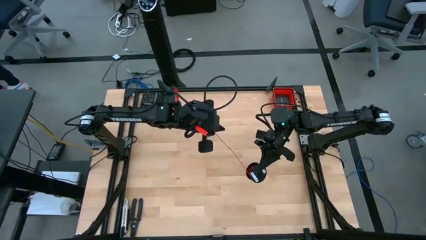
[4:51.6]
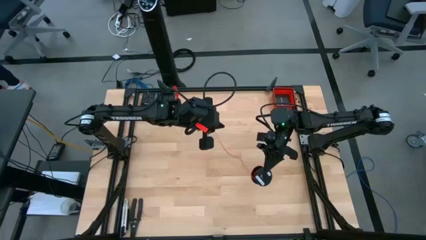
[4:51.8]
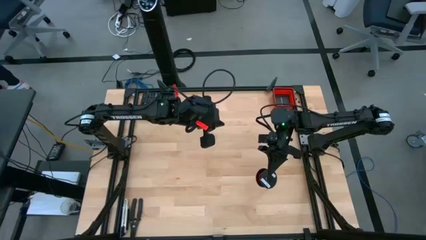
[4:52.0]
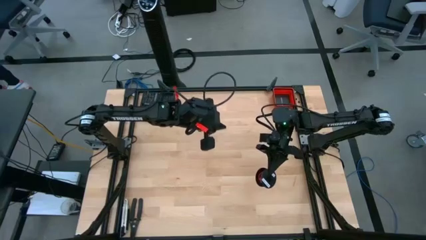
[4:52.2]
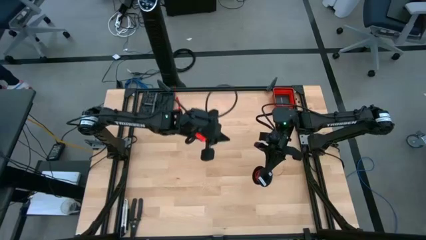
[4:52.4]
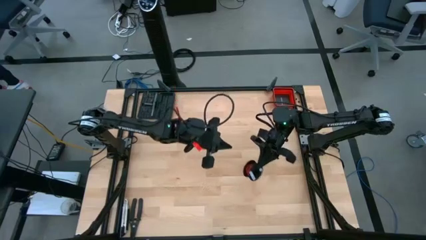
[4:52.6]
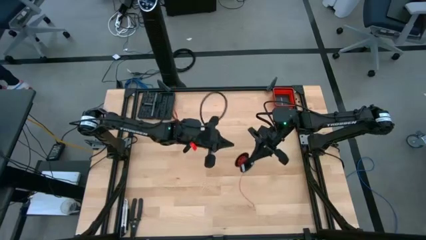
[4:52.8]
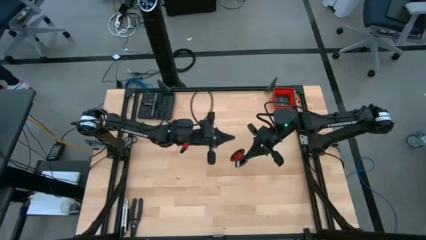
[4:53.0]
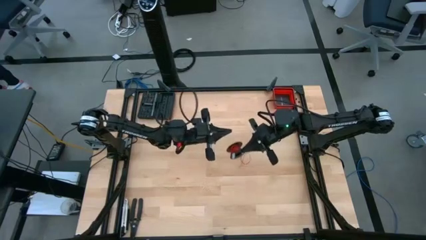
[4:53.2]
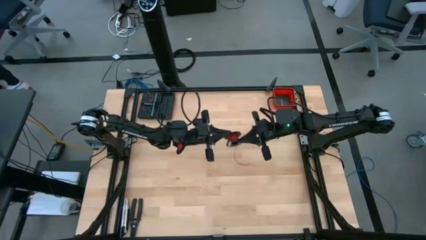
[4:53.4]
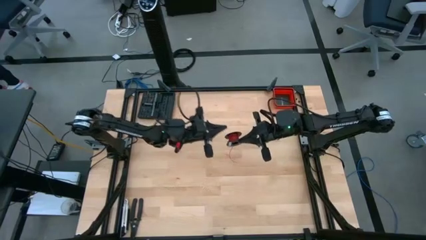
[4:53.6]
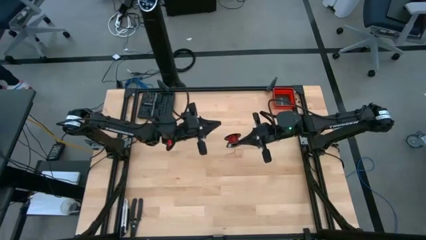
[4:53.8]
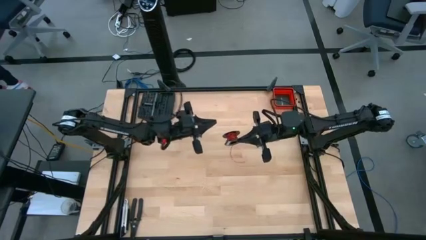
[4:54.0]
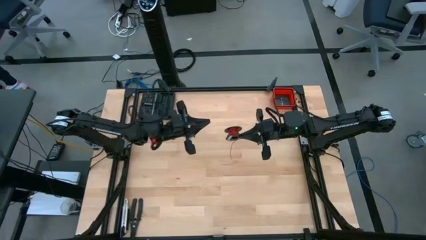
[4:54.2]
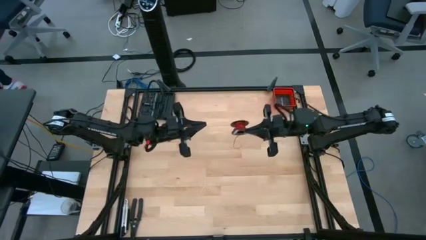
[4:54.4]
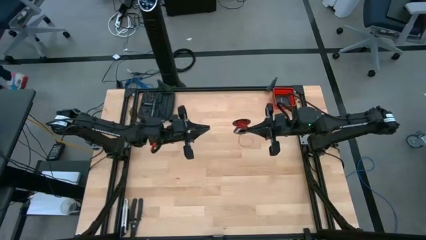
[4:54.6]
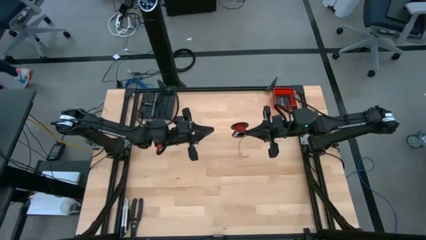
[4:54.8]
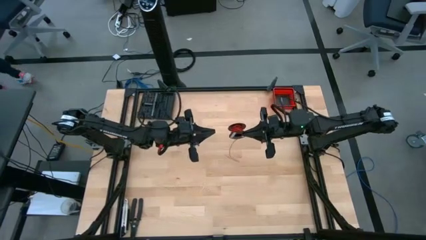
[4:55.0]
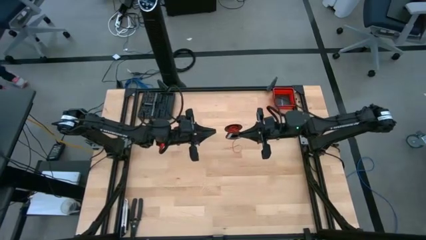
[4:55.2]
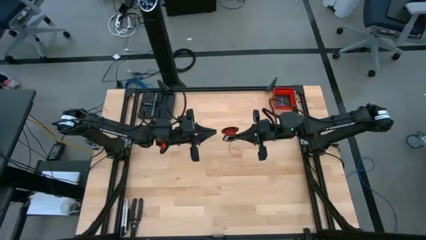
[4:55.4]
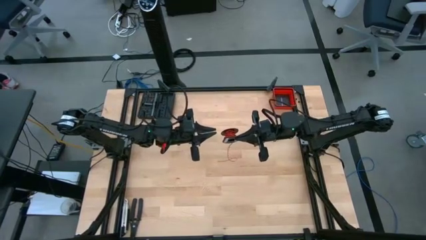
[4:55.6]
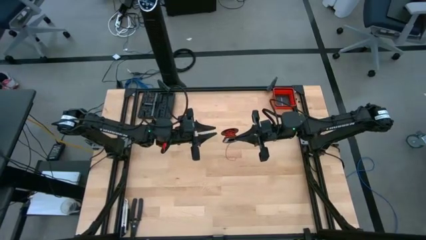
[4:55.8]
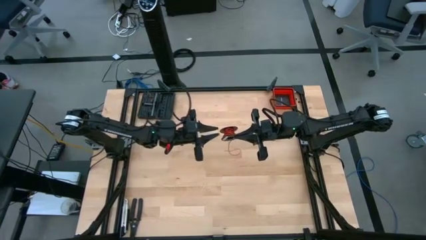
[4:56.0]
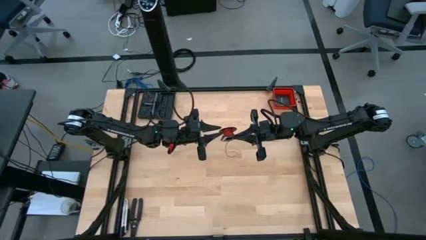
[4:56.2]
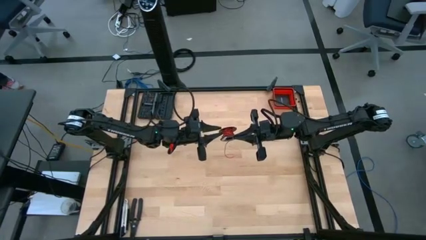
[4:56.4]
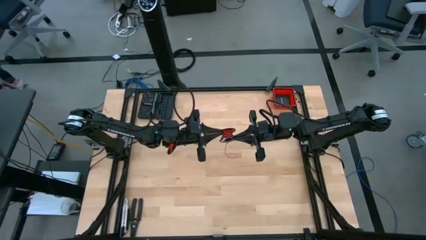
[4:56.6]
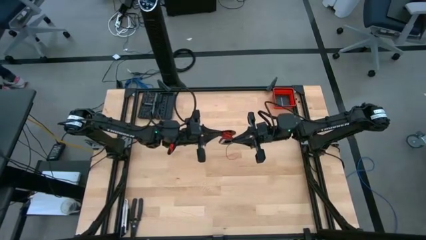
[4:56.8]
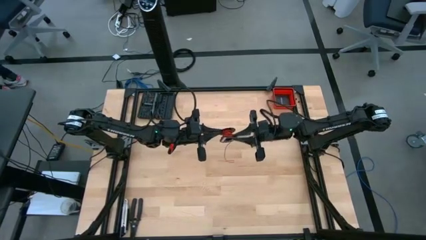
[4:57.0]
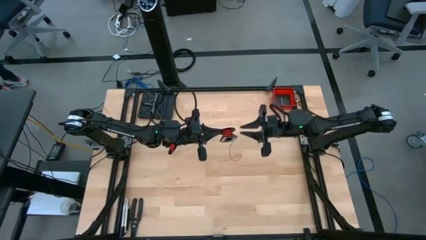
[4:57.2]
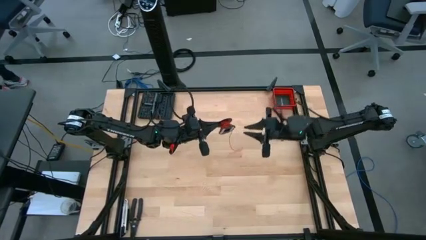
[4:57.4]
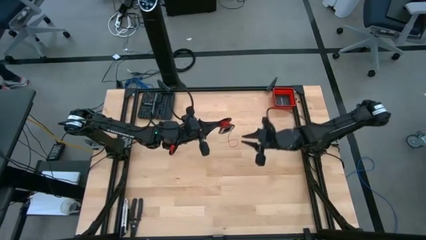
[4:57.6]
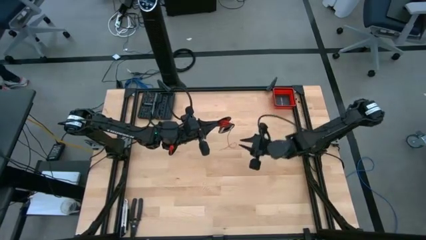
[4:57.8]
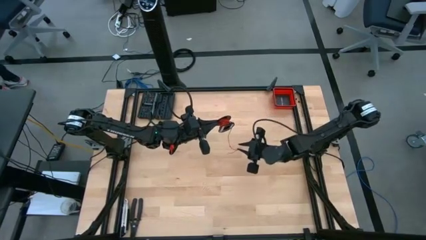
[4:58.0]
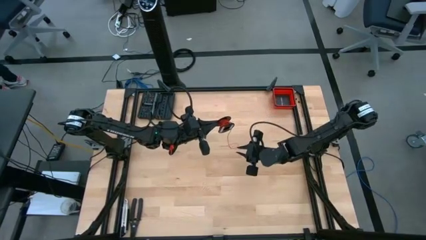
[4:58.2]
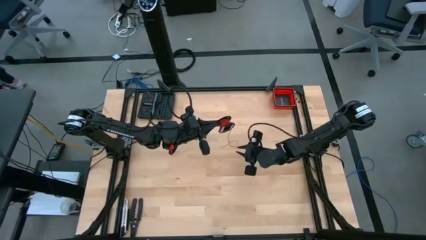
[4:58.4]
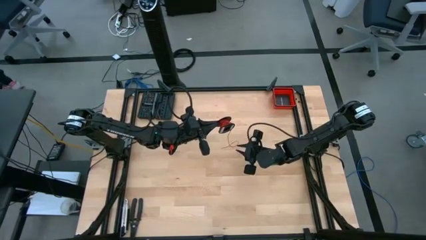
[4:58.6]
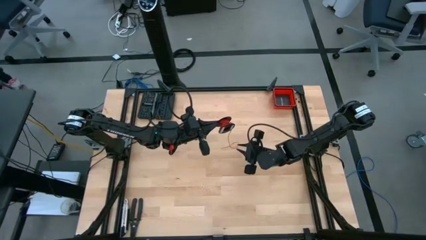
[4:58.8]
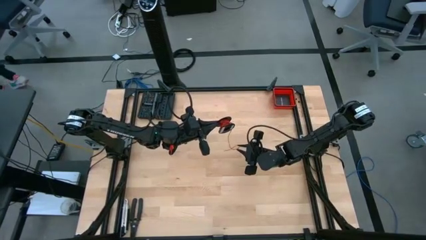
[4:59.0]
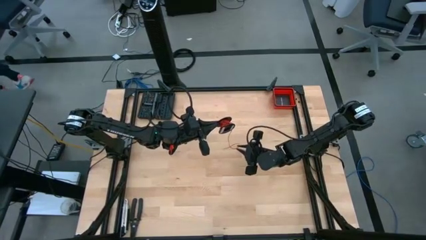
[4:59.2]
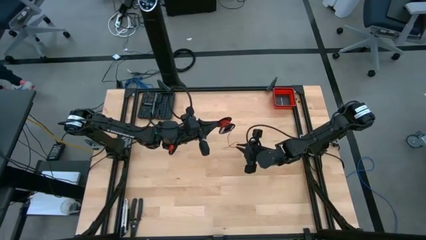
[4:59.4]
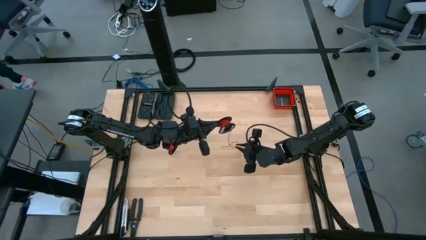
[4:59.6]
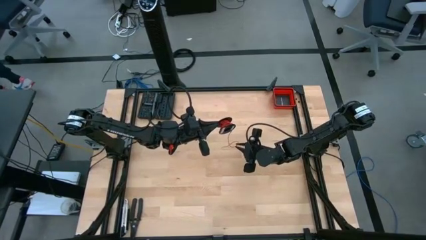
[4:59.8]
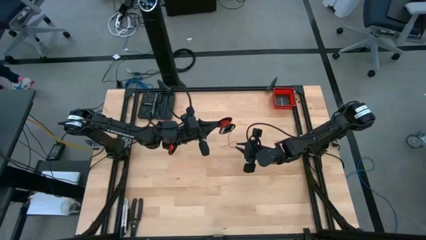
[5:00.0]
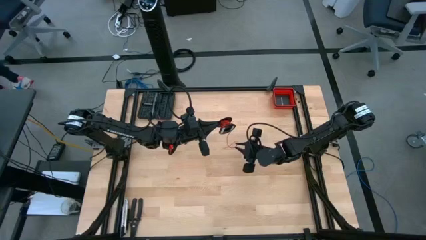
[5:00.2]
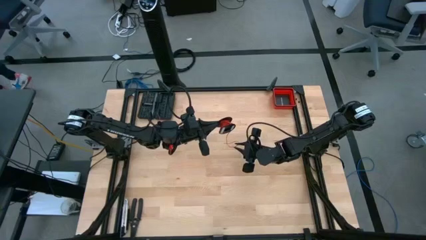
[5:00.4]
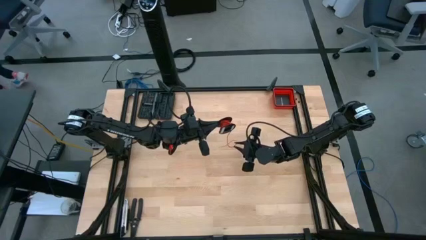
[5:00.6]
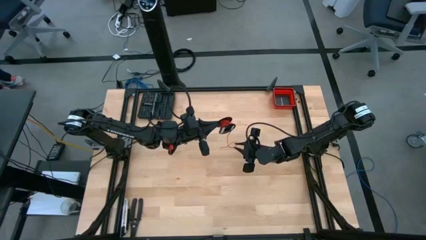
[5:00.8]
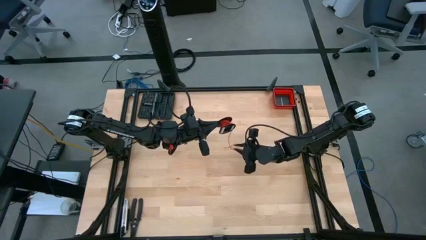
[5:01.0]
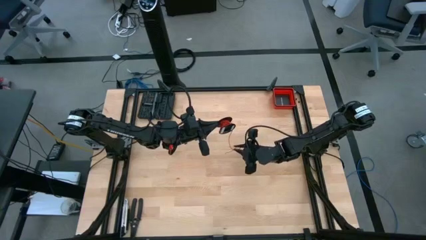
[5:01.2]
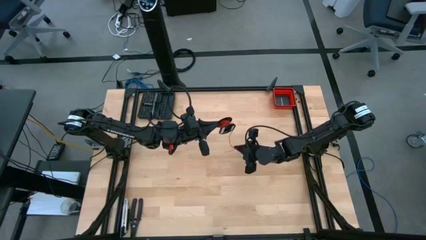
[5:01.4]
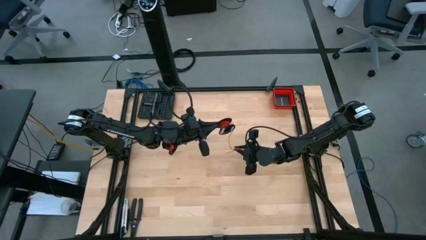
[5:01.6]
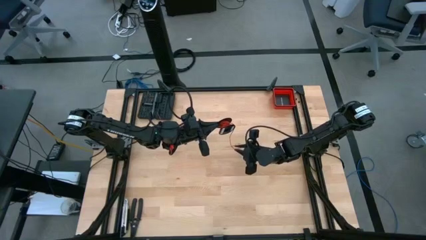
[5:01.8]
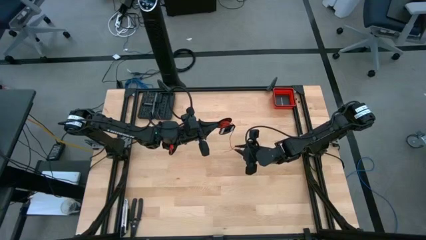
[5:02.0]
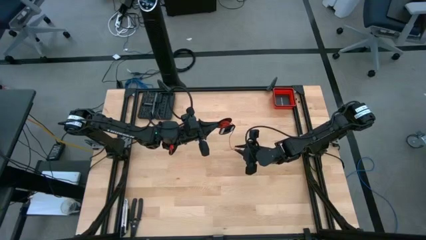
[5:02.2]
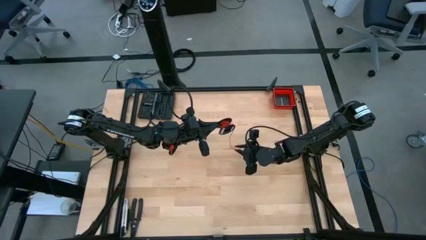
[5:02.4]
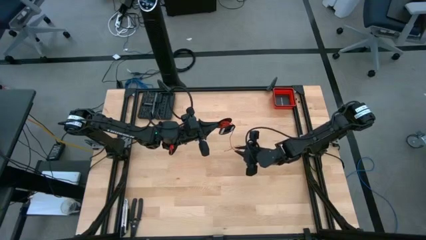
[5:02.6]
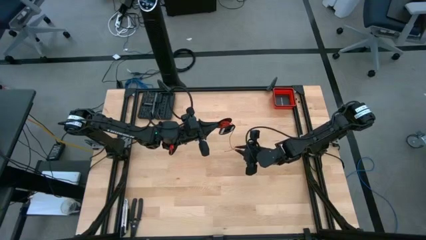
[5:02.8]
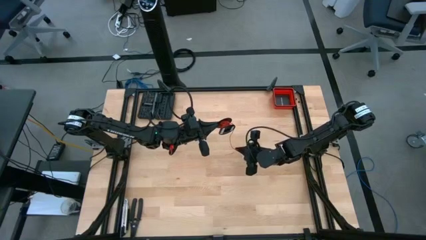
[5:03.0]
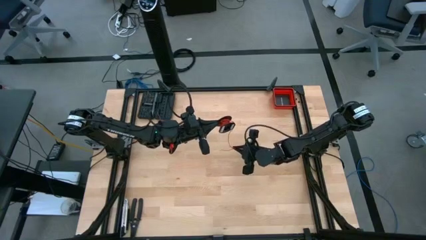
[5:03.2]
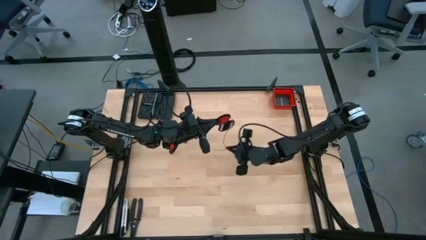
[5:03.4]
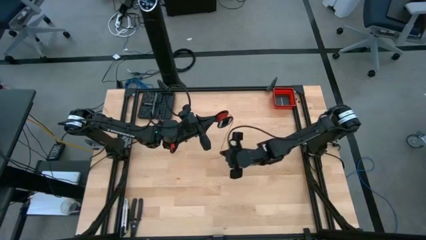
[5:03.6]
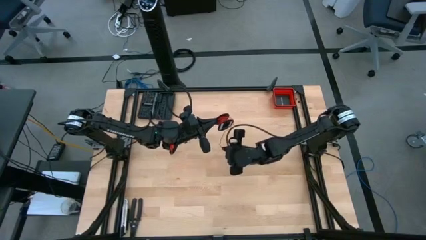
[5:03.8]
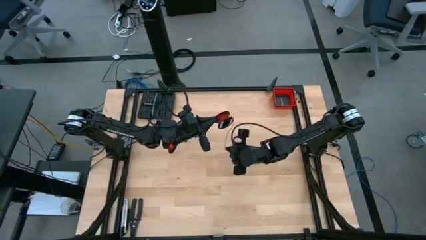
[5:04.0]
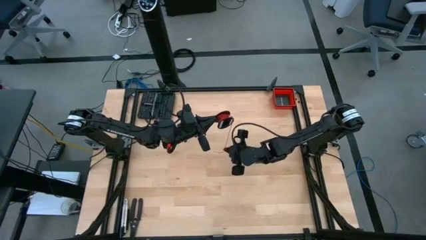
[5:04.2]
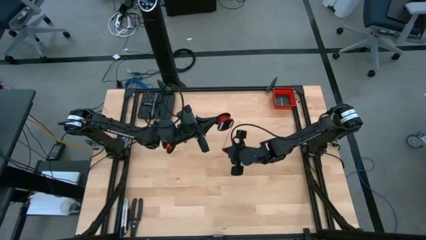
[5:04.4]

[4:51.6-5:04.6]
Task: Coil cords
Coil the red wire on the black spool

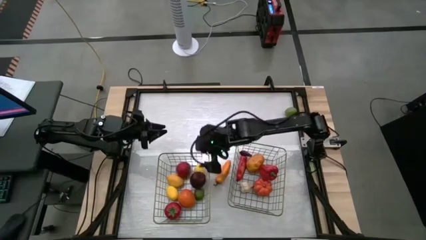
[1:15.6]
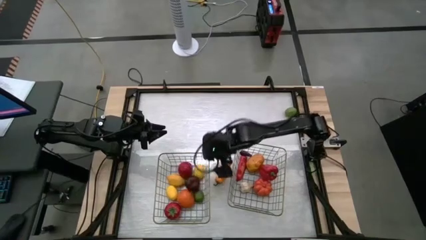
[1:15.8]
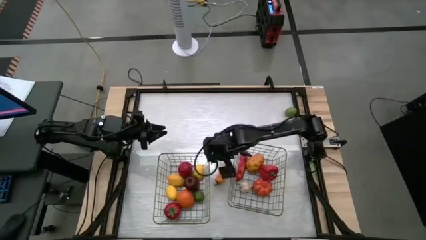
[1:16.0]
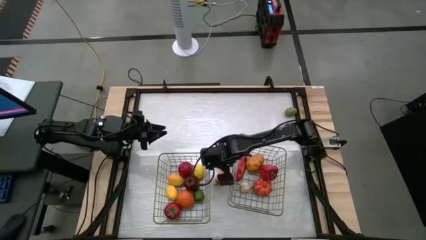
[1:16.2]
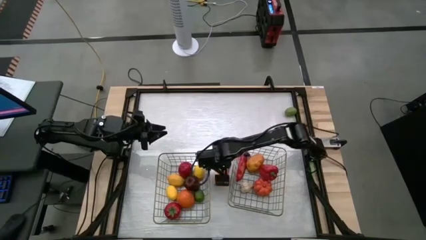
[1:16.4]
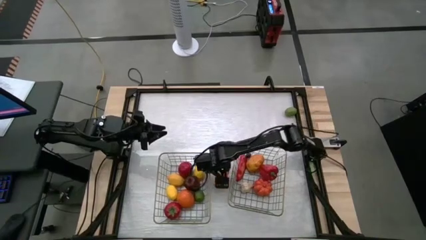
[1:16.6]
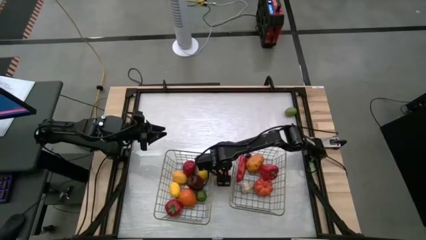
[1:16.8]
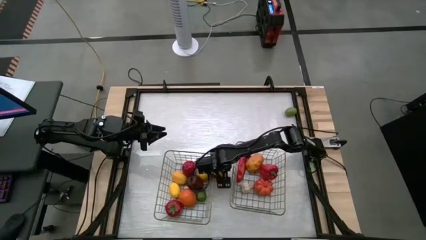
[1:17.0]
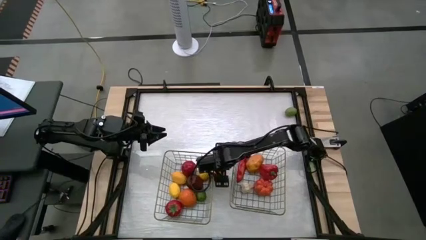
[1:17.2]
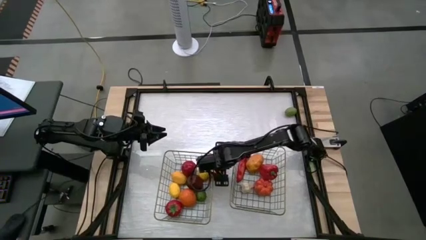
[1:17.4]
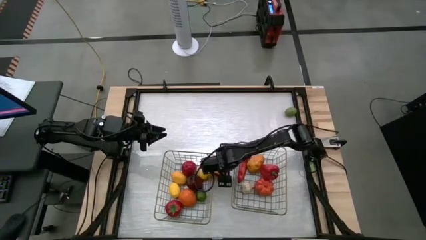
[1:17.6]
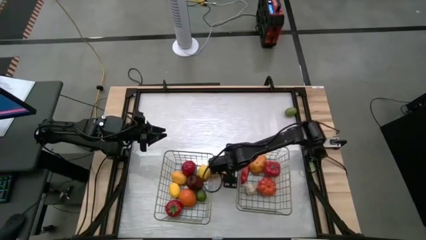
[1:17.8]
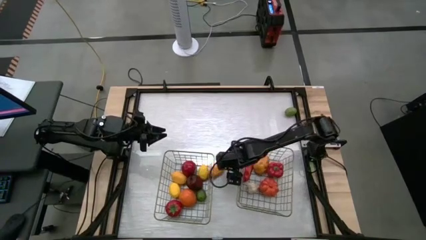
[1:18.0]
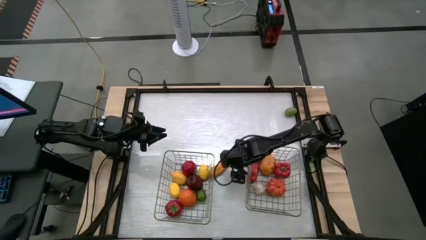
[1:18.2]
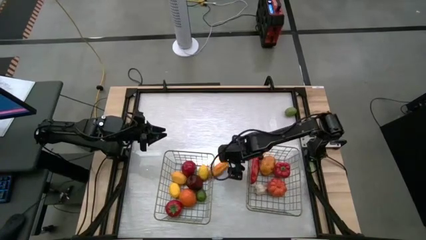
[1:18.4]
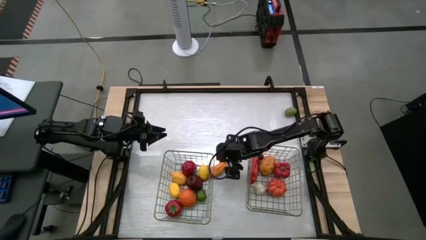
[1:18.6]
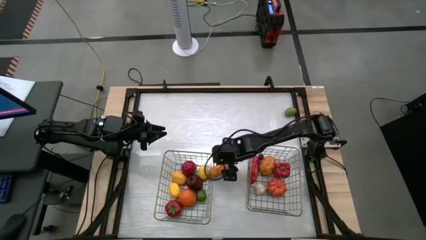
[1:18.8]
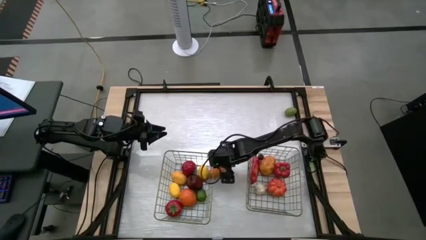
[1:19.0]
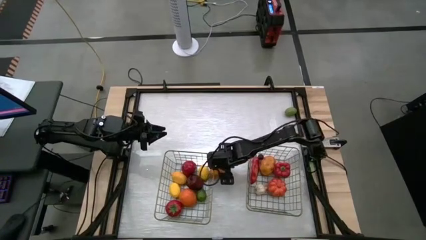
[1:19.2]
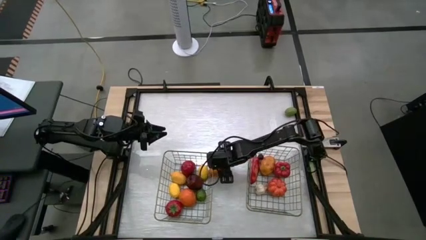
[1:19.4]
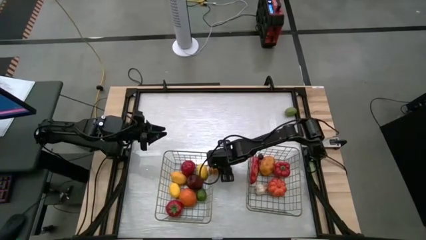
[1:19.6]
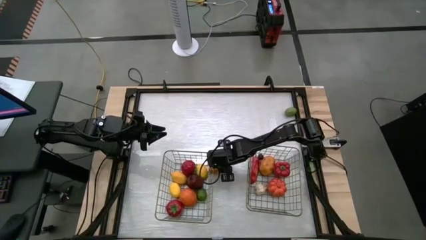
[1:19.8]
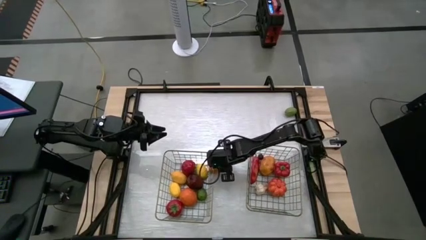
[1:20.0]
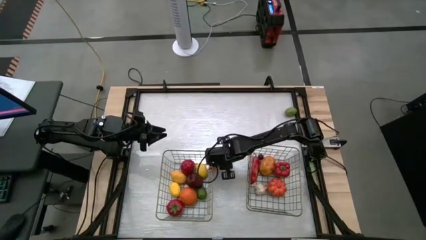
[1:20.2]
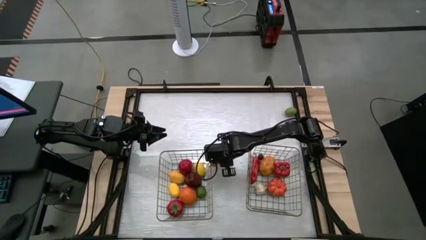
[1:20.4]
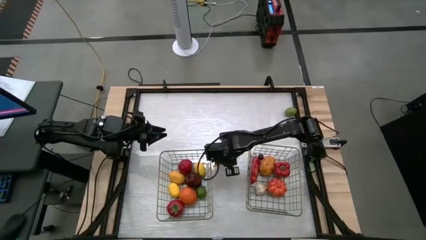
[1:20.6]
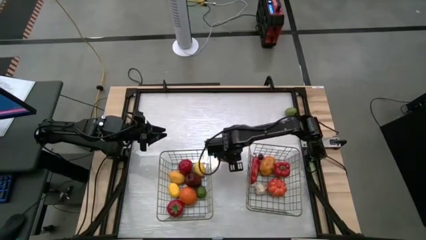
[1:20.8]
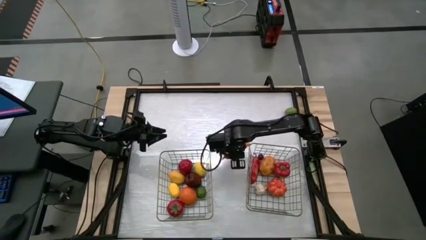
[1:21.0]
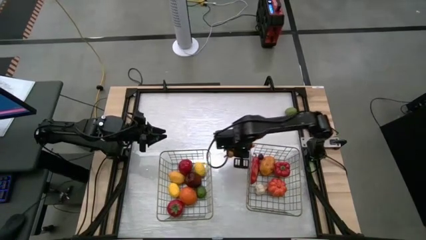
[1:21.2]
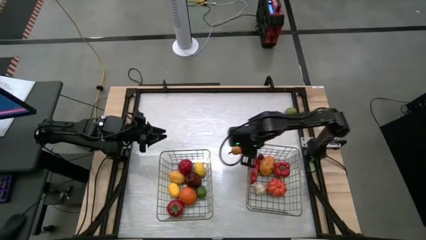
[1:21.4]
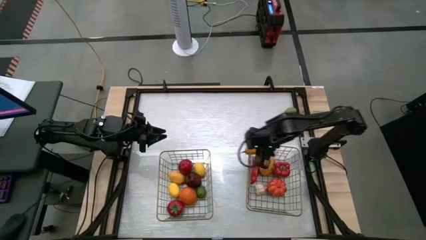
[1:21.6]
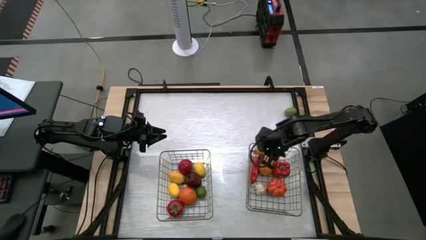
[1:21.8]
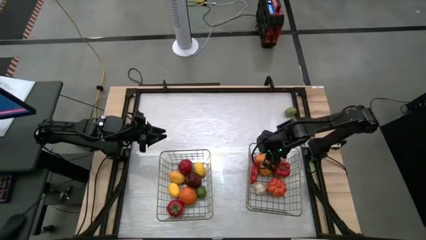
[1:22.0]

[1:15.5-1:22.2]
Task: Sort produce into baskets
Put the orange chili pepper into the right brown wire basket
